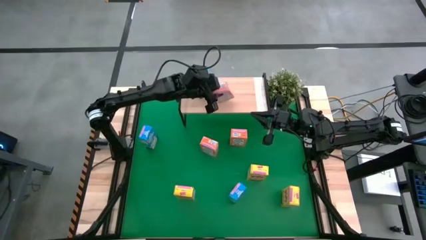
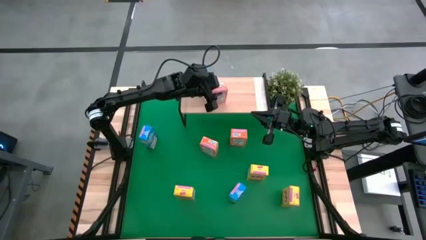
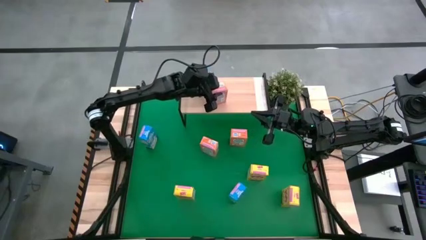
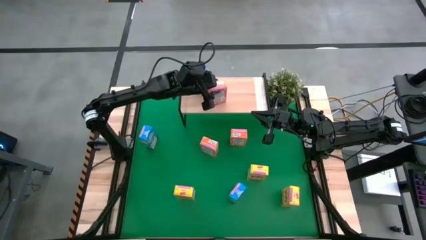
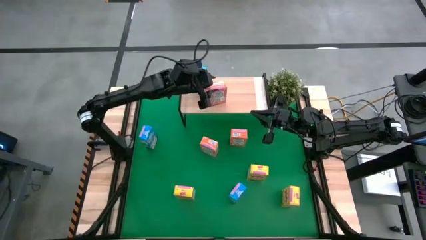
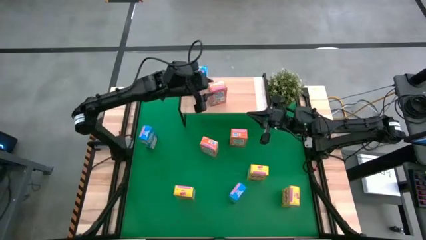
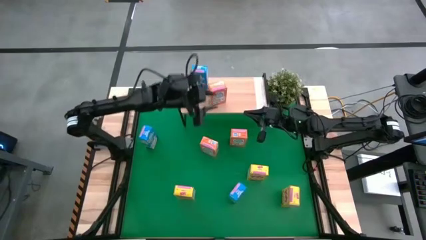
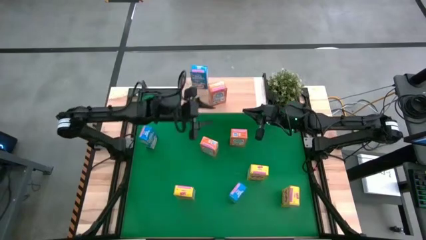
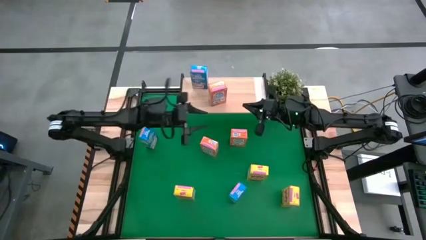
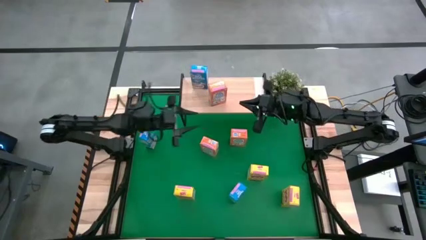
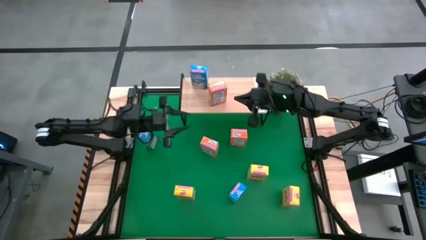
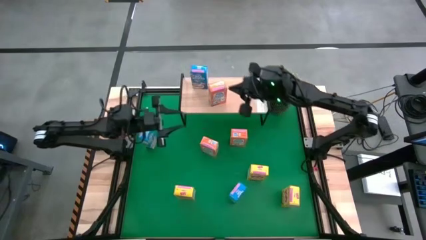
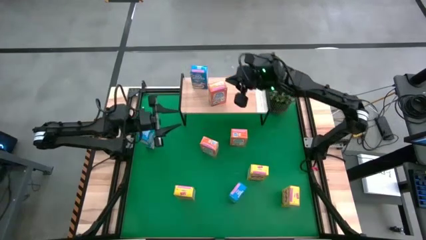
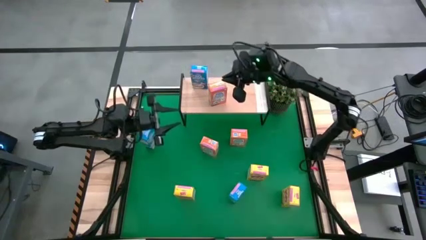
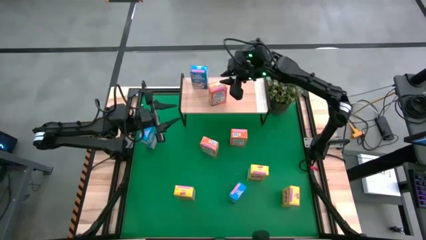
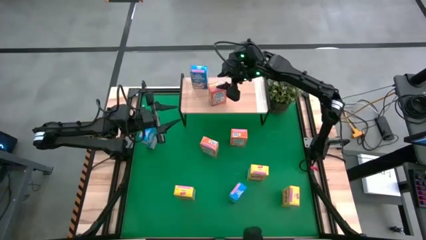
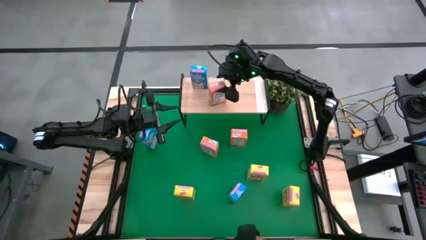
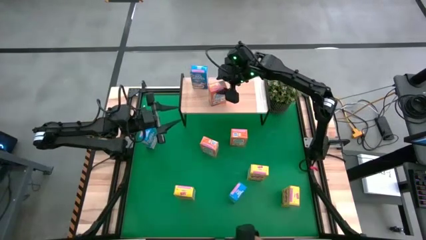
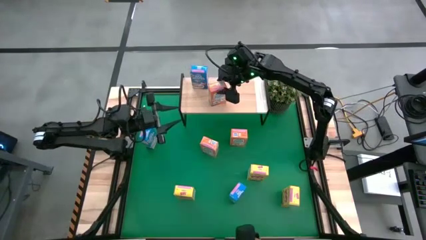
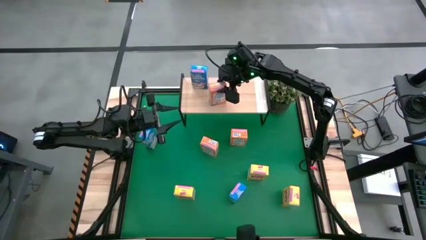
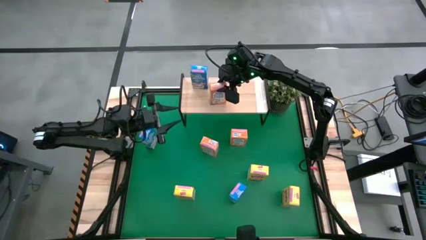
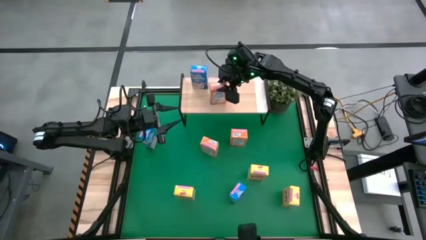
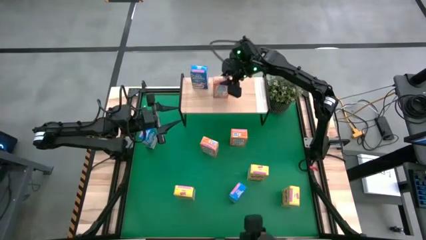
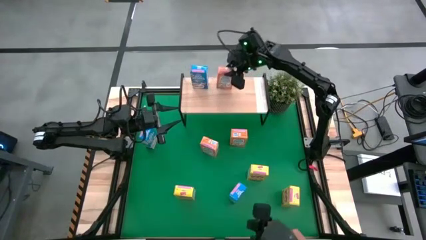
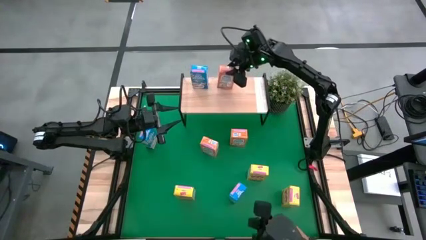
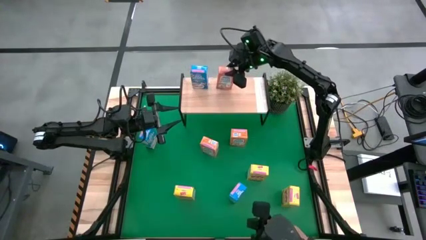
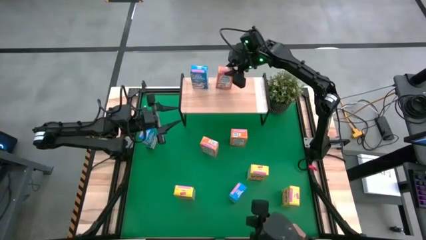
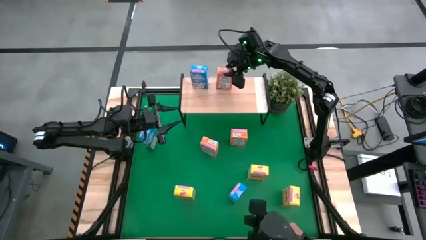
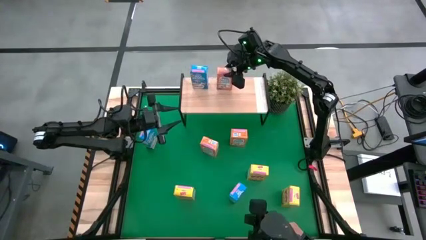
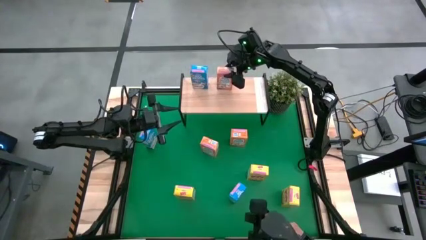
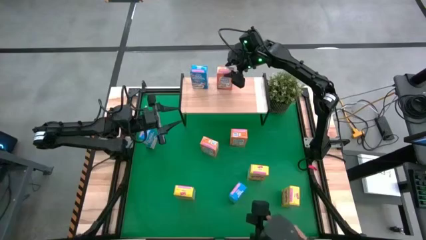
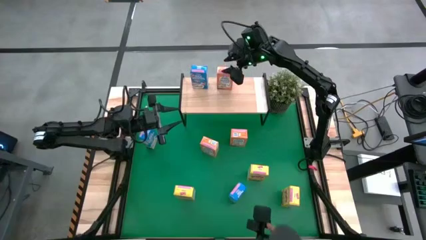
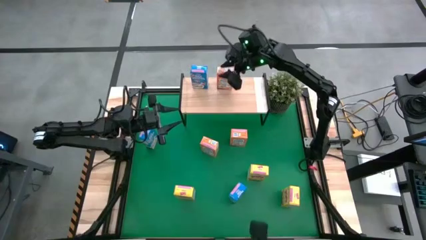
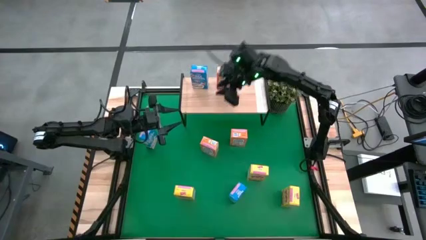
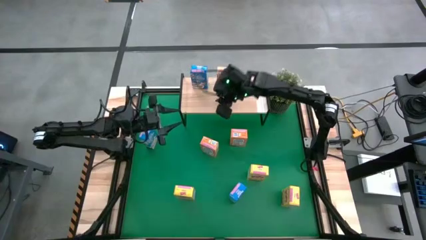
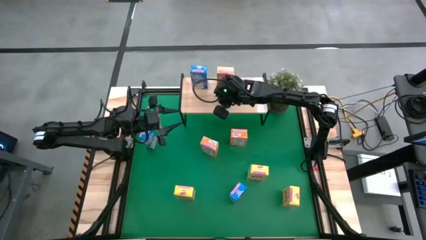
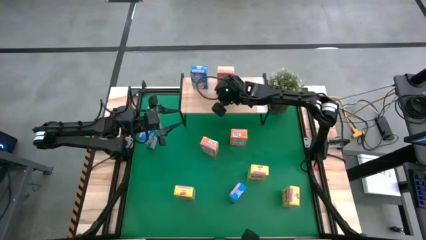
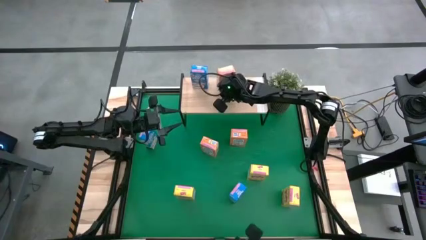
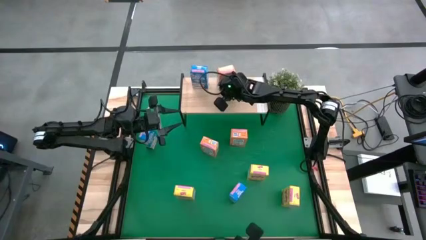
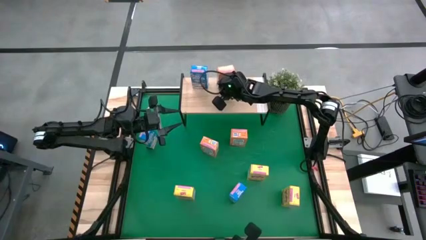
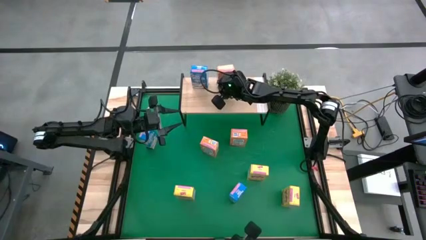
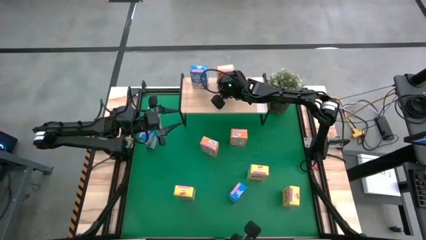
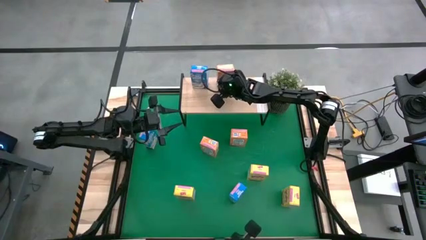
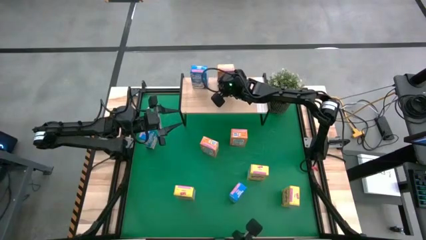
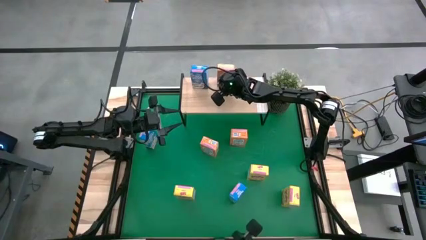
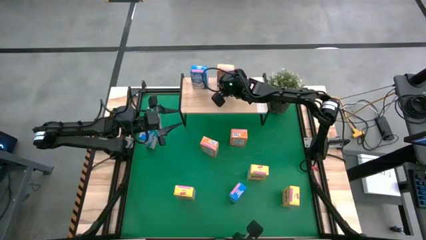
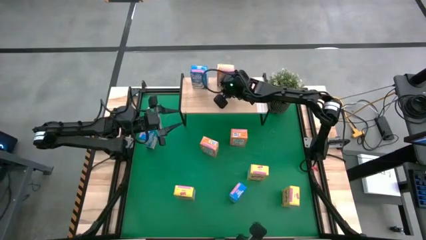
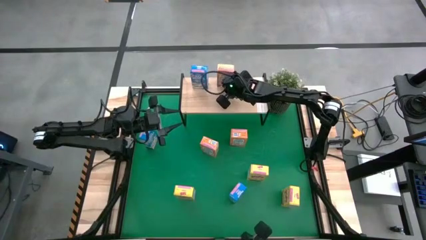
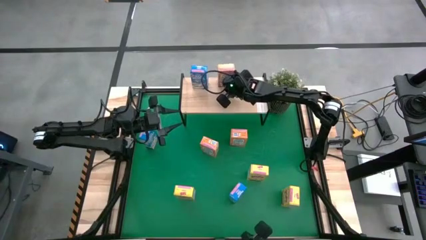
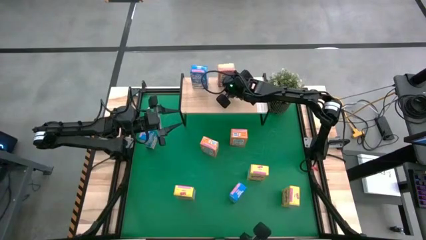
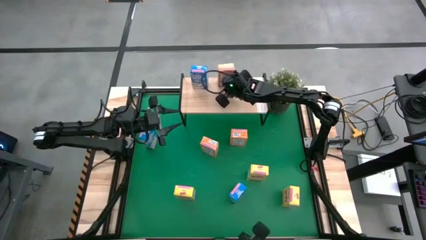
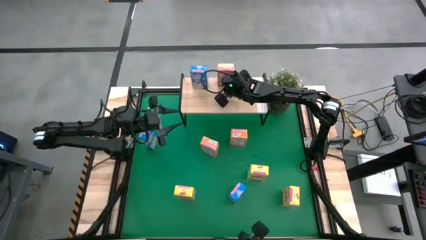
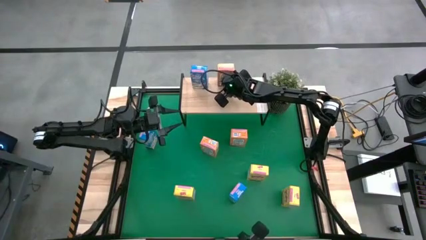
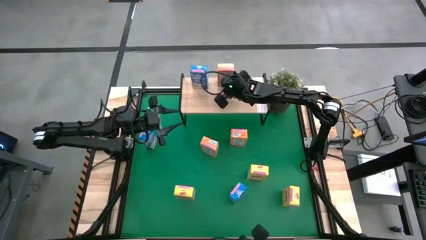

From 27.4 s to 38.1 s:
Task: Stack cereal on shelf
Put the bottom orange cereal box on the shelf

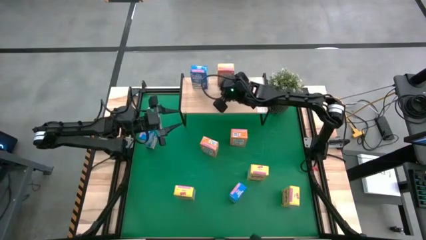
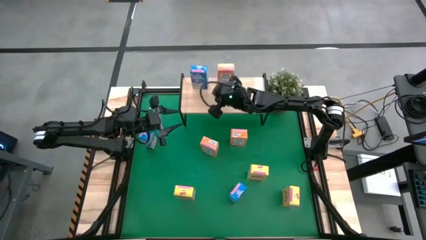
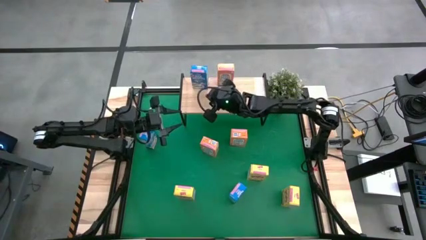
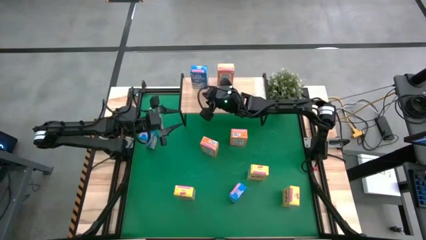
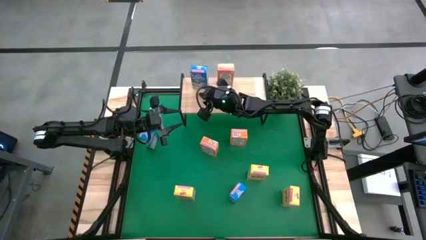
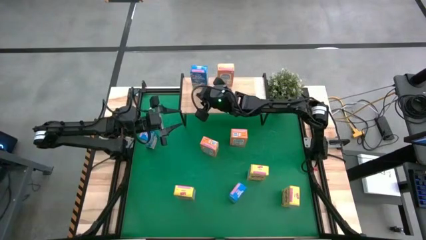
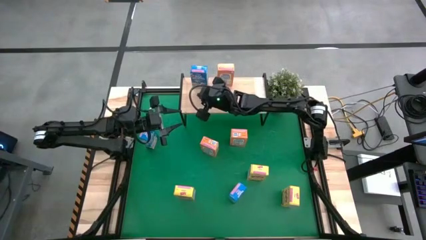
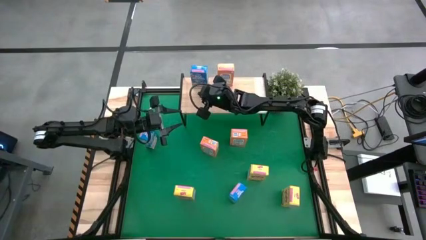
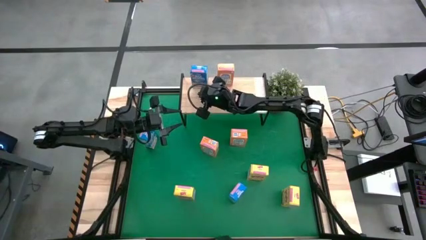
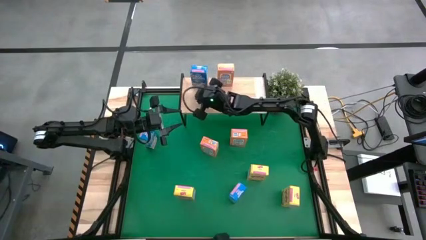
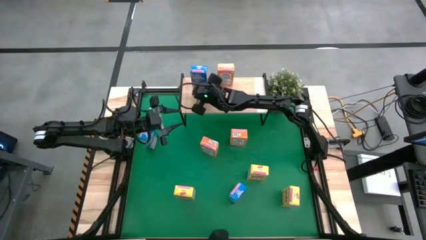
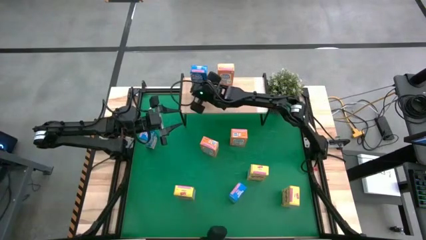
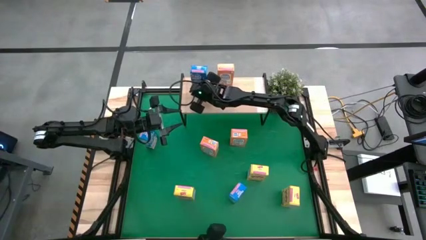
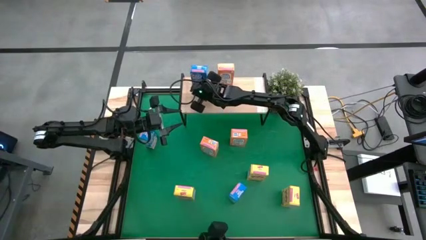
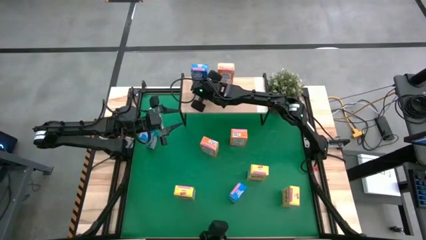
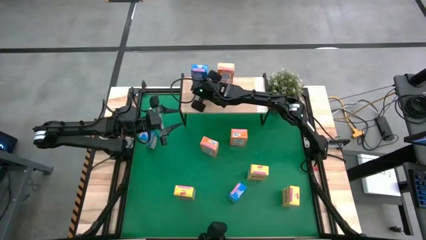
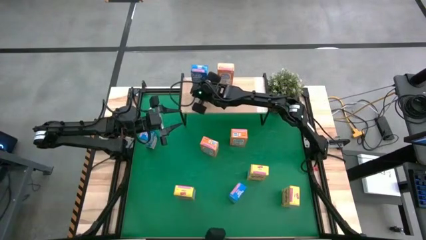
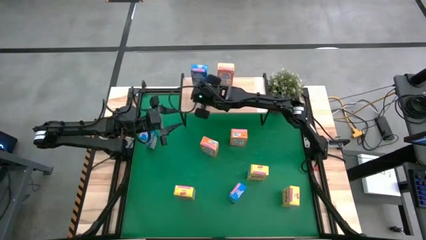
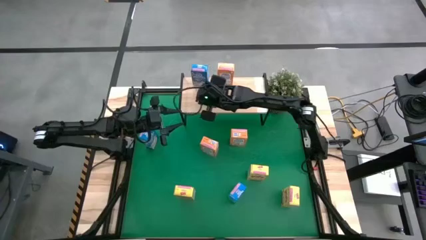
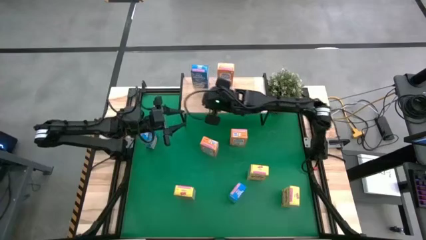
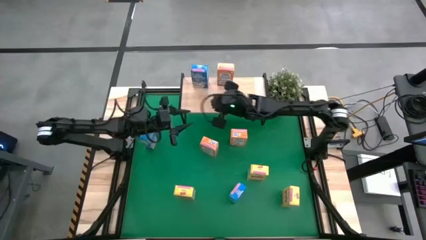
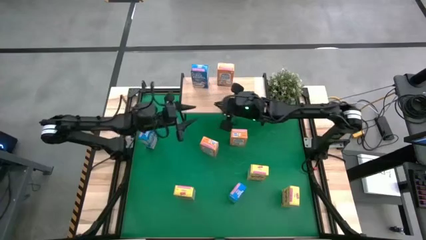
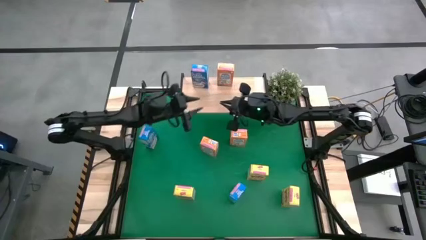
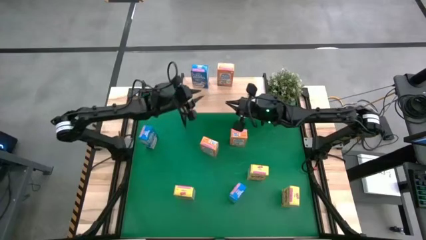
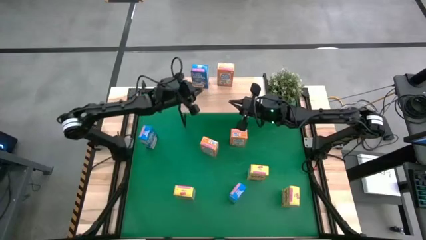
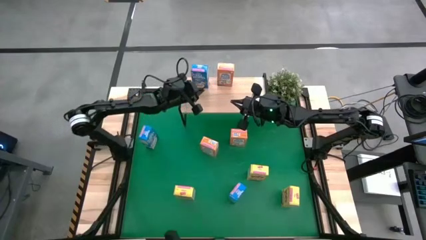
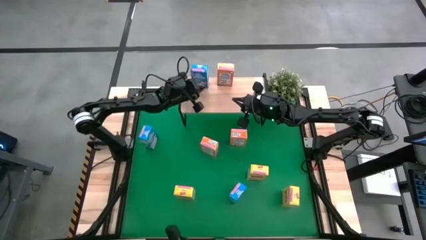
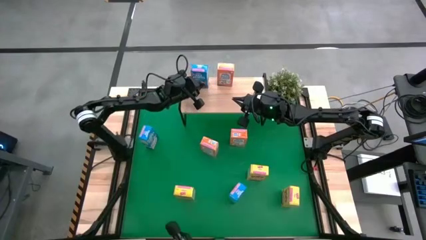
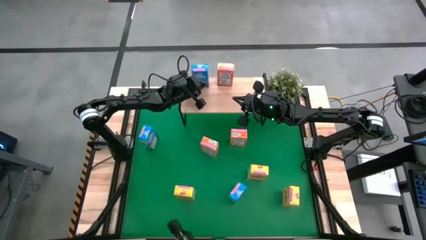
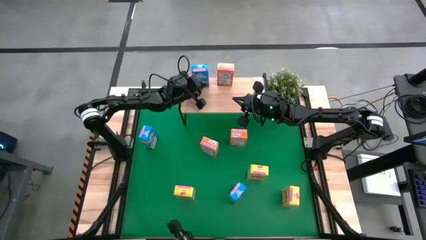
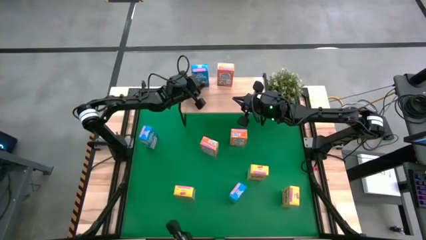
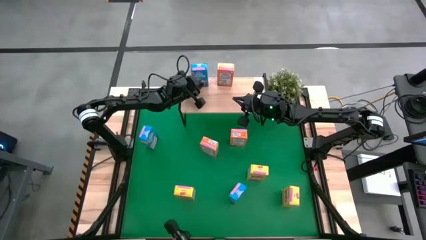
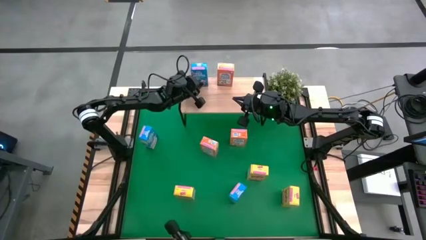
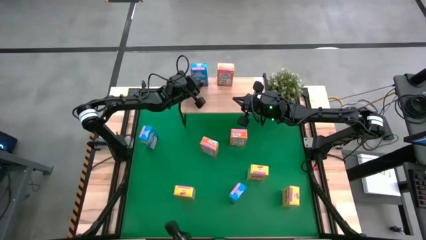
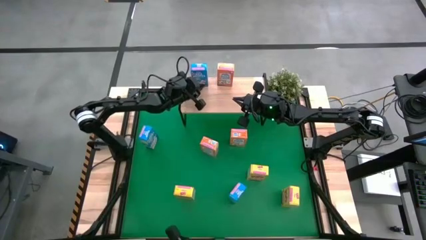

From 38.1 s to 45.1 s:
Adjust the blue cereal box on the shelf
